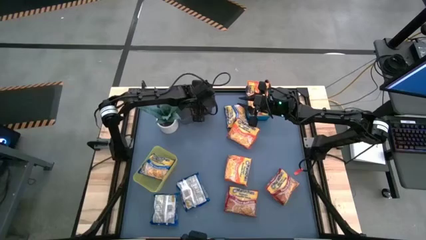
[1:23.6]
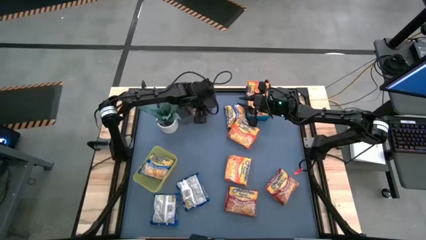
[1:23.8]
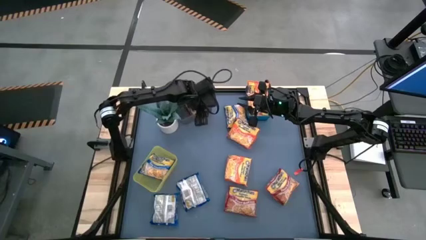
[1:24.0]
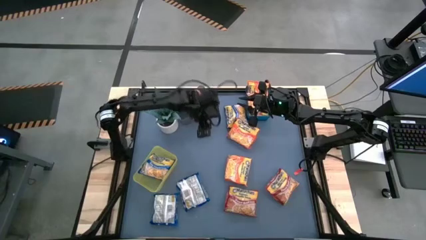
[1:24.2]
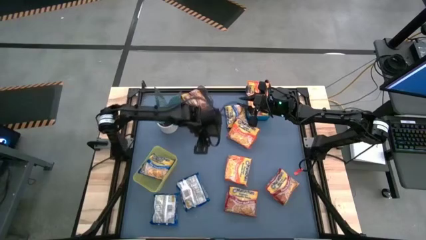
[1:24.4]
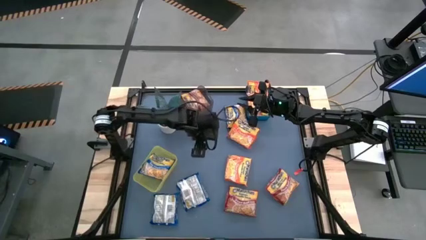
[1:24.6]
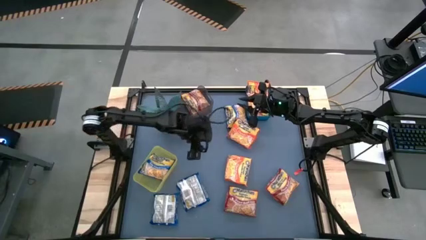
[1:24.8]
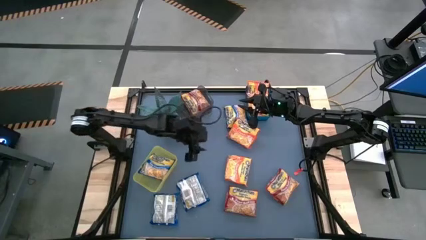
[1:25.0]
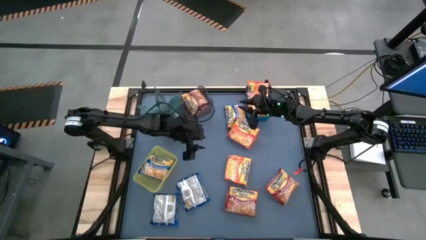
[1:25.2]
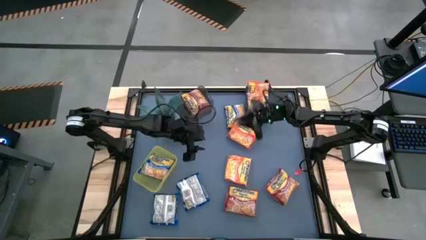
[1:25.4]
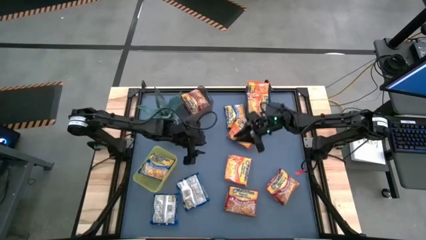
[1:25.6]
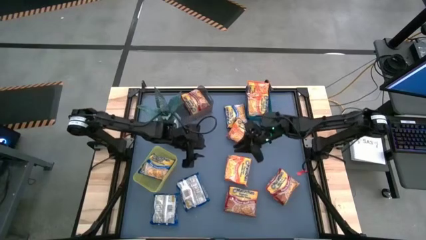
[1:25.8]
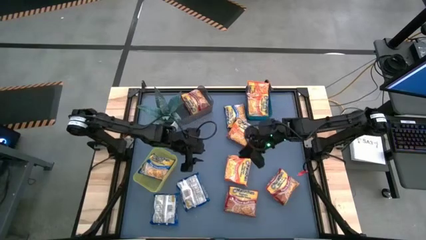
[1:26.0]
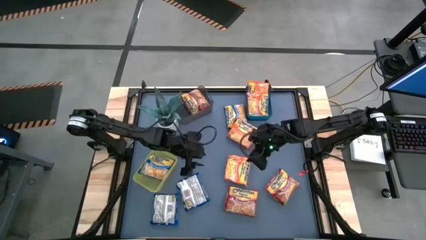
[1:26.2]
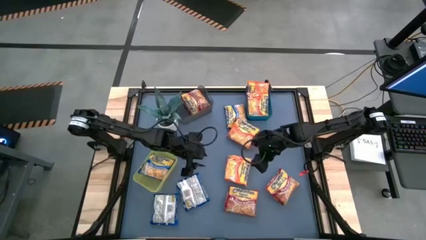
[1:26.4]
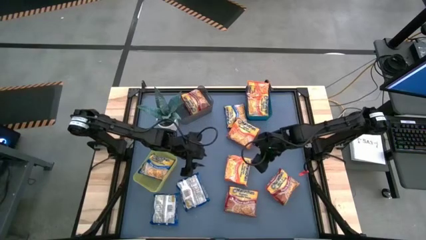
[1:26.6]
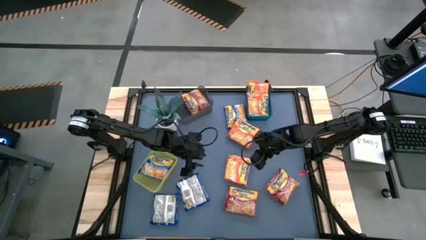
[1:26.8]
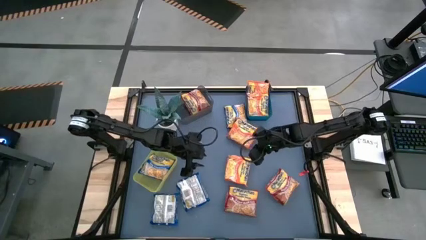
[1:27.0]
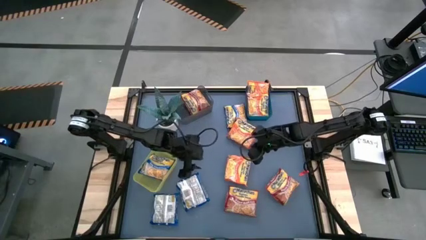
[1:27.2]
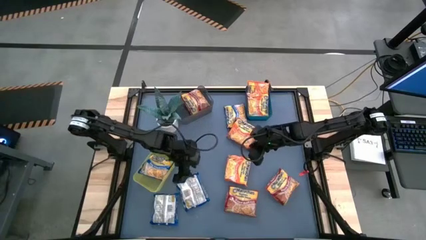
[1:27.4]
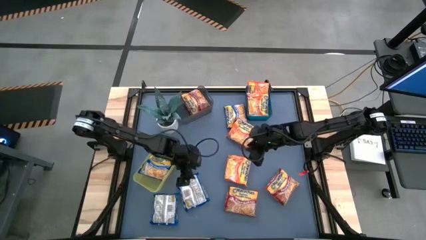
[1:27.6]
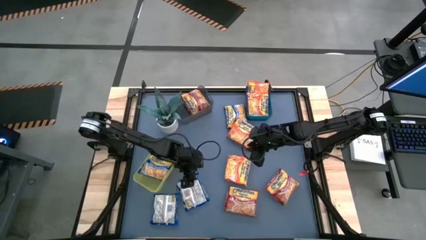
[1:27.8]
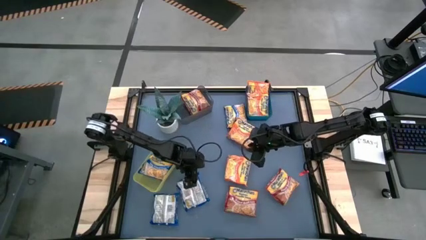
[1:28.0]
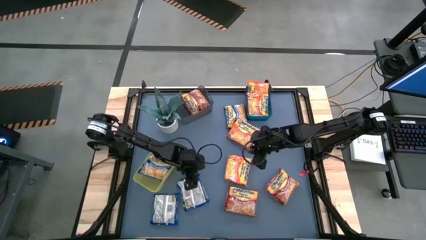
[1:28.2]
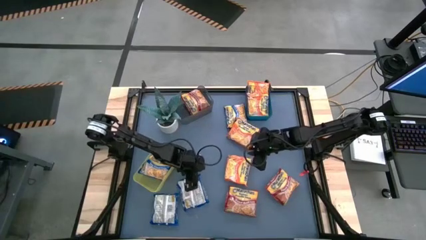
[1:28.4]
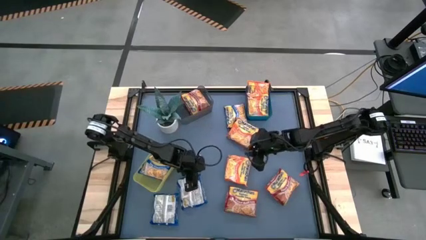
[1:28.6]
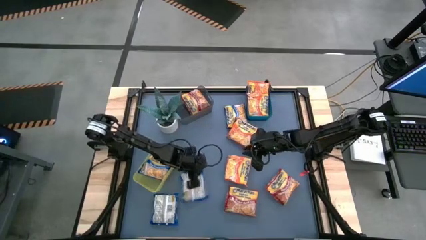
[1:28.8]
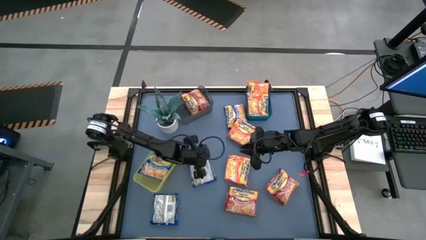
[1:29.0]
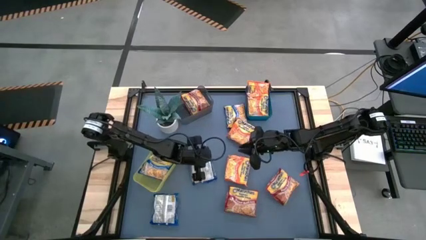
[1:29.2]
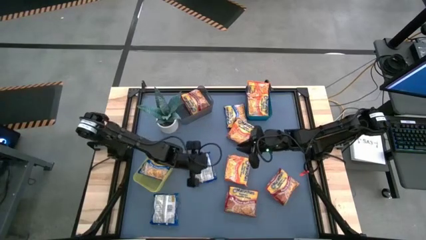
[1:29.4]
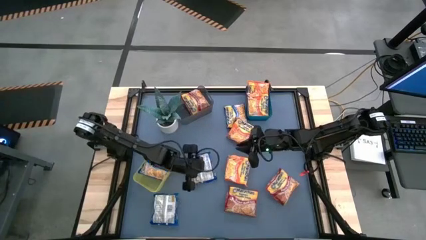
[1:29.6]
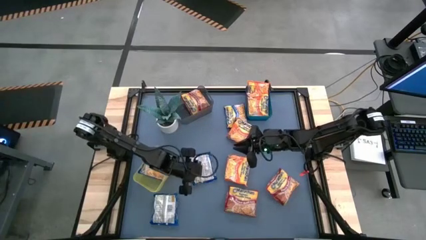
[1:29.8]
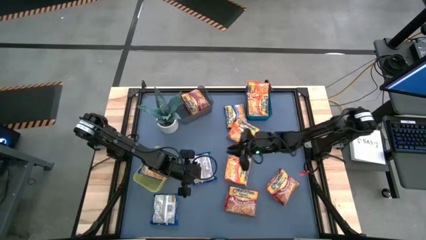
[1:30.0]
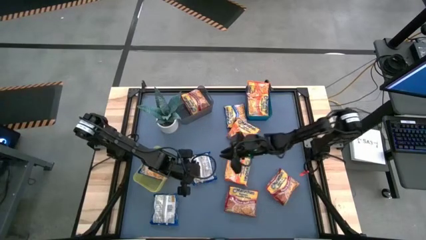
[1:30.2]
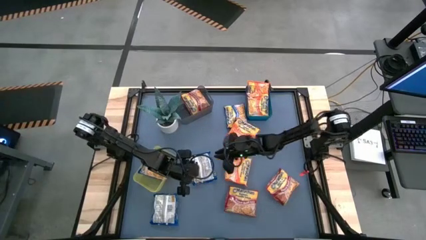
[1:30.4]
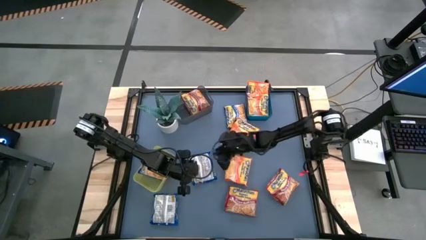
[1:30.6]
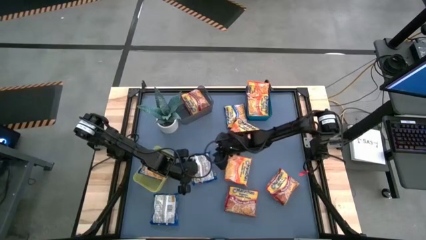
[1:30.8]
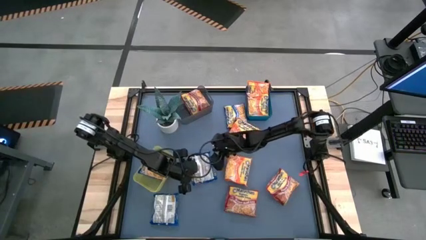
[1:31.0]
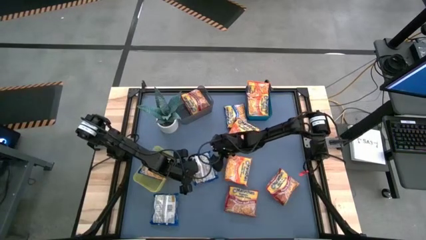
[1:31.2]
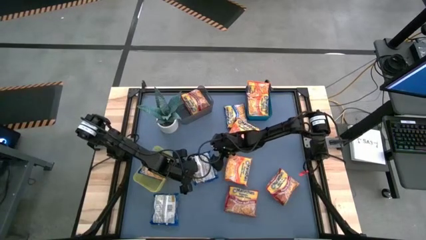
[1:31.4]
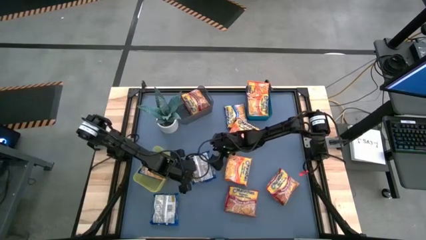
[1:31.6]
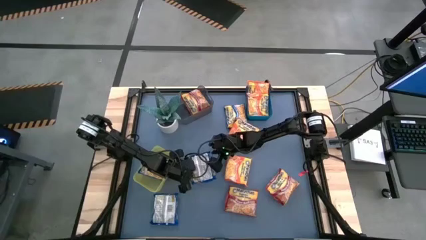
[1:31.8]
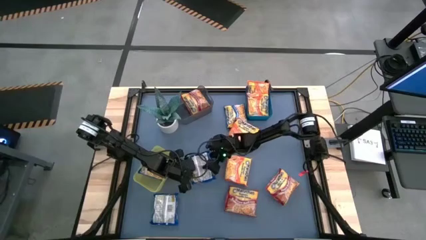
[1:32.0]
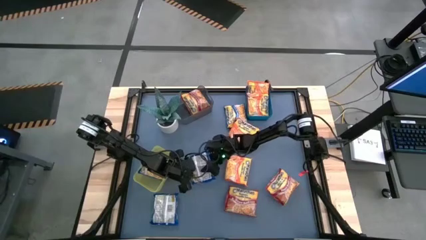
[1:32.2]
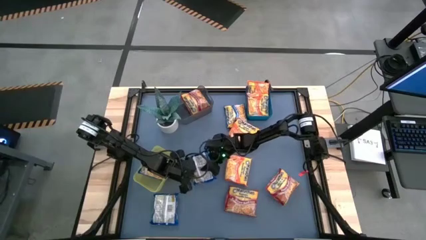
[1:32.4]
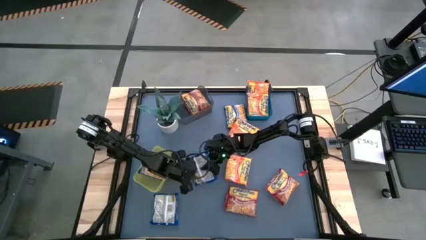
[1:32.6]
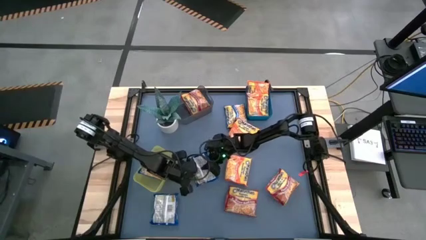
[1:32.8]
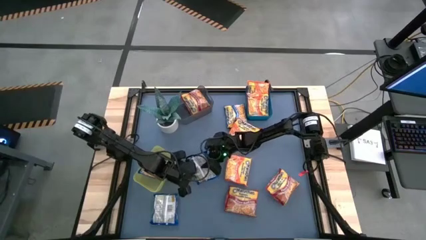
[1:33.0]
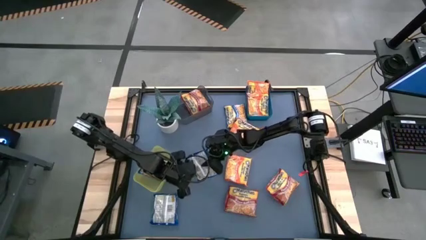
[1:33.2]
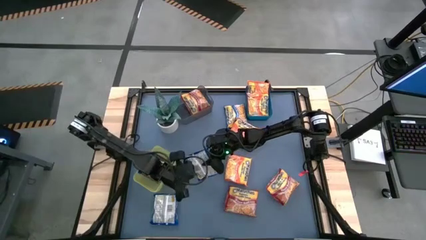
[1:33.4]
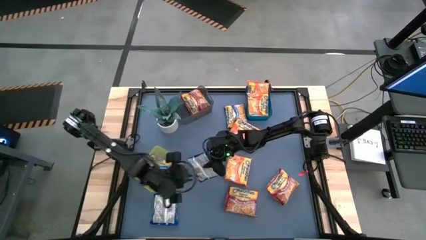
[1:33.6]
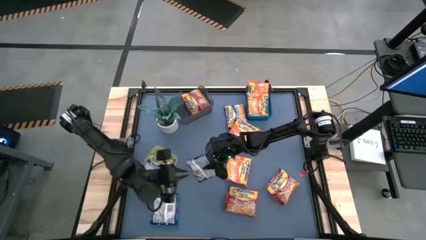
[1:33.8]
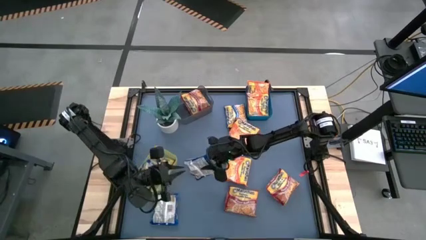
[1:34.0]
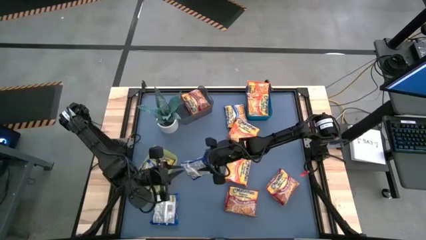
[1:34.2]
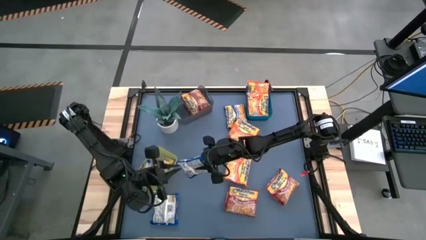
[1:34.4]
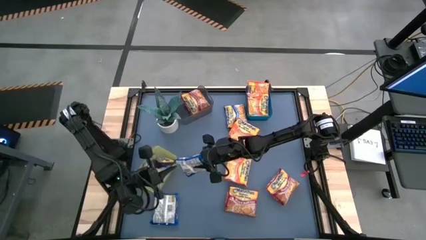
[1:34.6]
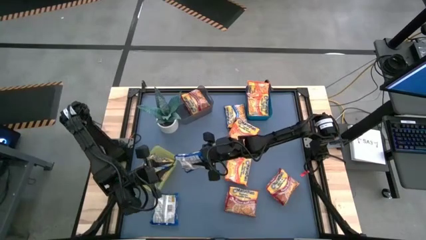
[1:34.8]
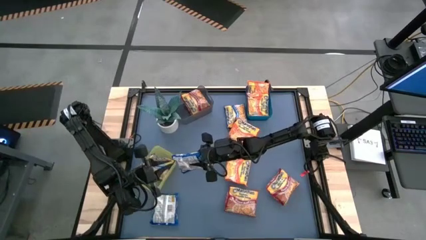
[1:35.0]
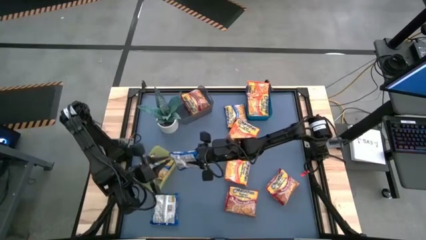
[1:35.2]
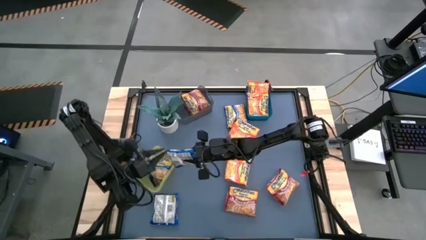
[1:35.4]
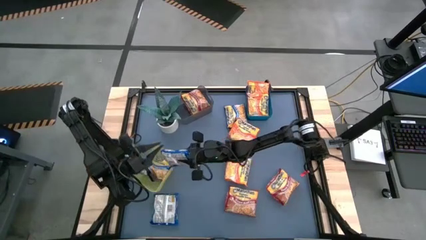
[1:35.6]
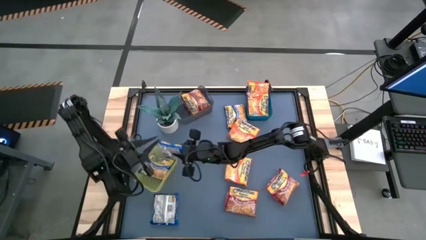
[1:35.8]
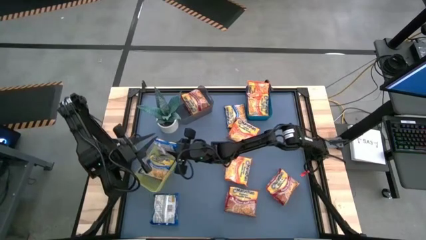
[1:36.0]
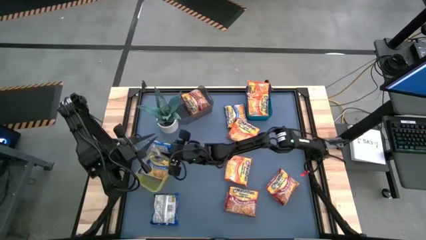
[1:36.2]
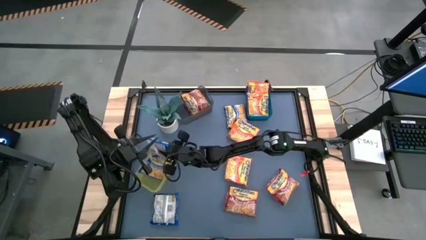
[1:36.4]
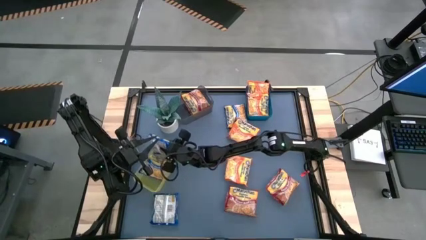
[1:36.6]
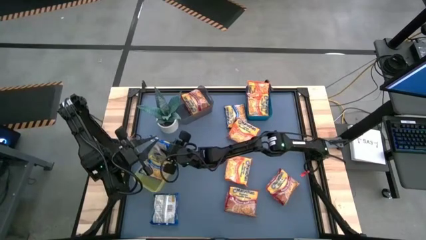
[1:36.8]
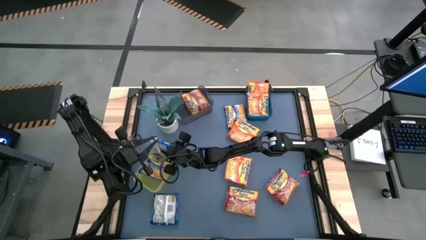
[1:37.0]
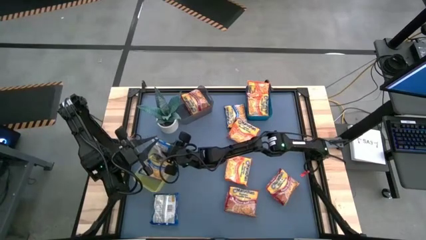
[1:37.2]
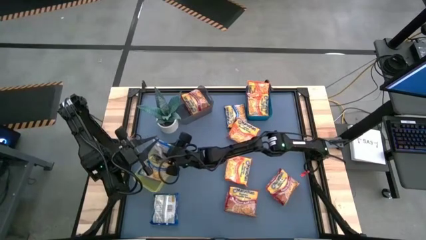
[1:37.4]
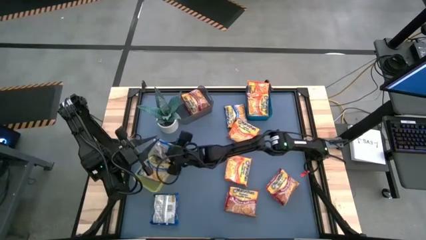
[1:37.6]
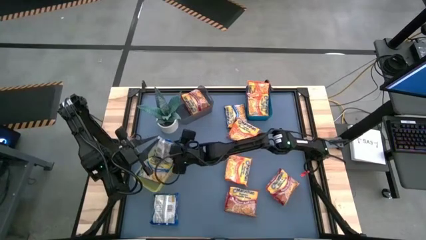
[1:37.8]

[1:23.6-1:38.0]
Task: Sort Maruchan noodles
Put the blue noodle pack into the yellow bin

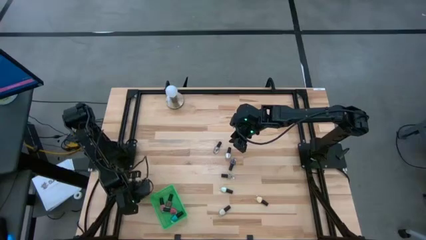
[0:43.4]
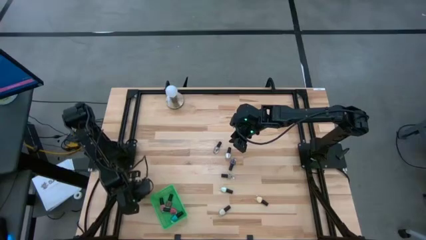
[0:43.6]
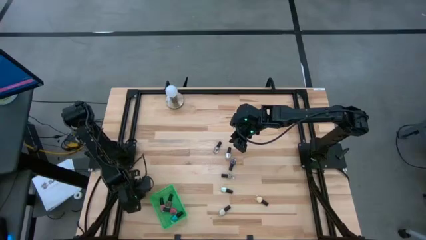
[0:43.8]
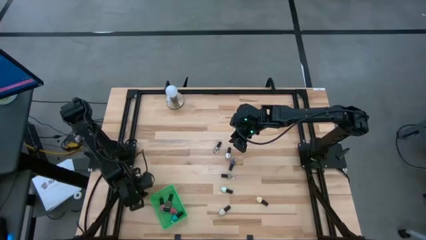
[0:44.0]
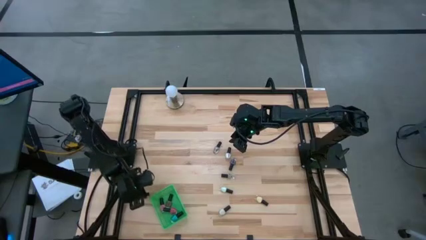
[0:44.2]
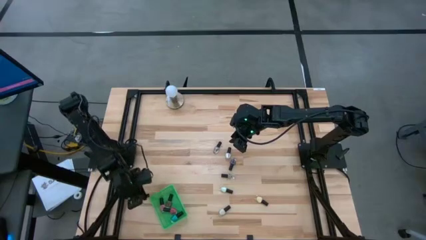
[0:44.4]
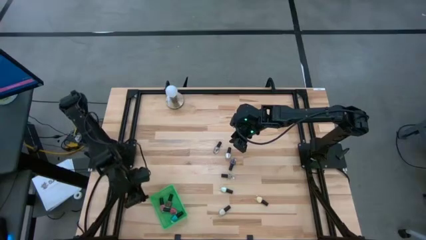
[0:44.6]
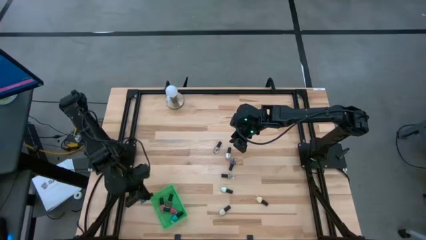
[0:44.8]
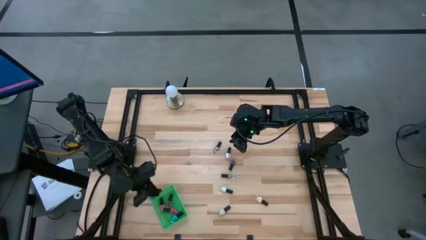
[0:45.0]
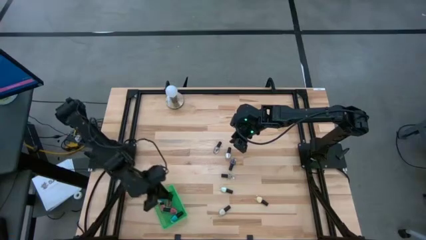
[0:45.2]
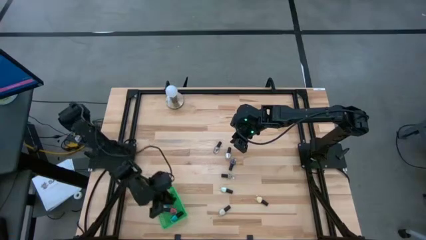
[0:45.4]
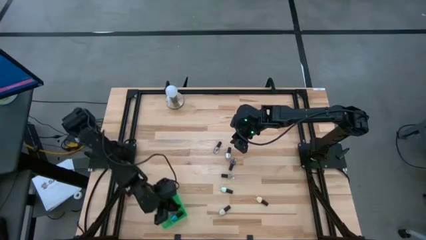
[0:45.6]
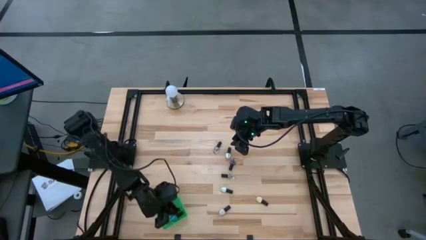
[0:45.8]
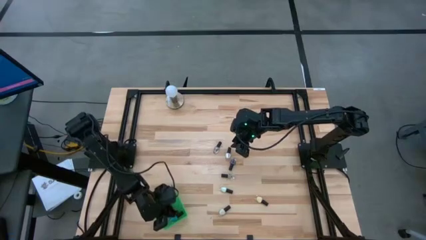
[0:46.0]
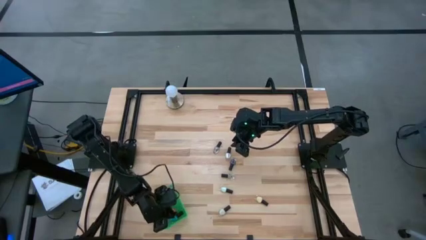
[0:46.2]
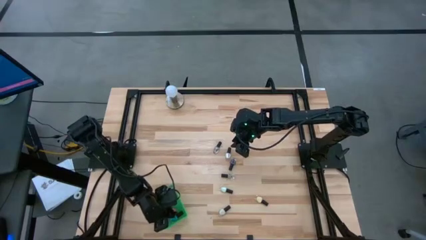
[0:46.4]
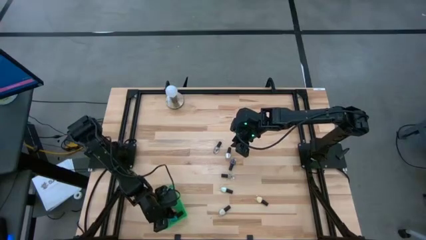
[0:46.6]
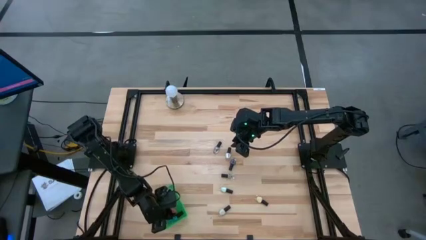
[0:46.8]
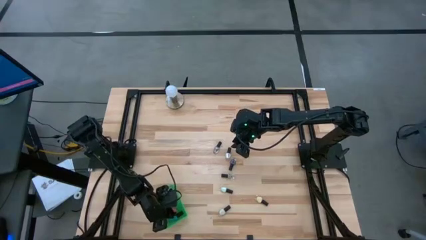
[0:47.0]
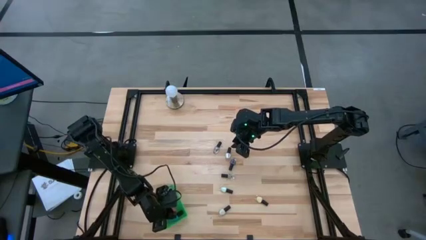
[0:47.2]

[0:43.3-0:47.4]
Task: Pick & Place Nail Polish
Put the black dark blue nail polish bottle into the green basket
